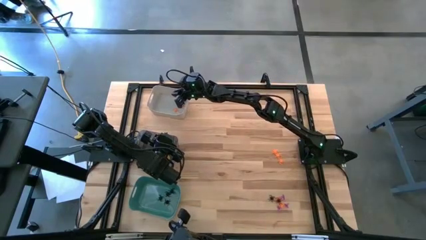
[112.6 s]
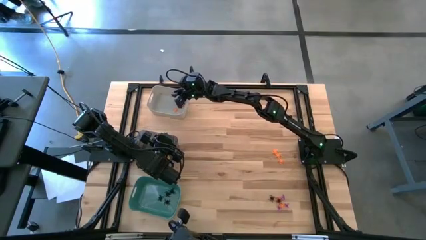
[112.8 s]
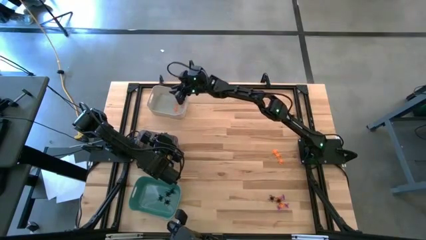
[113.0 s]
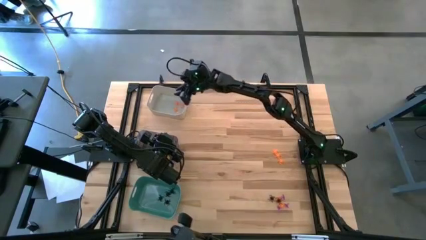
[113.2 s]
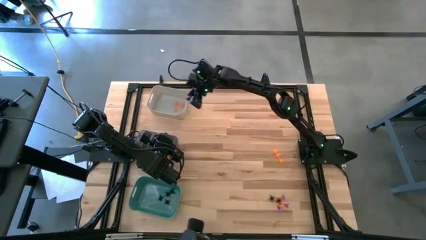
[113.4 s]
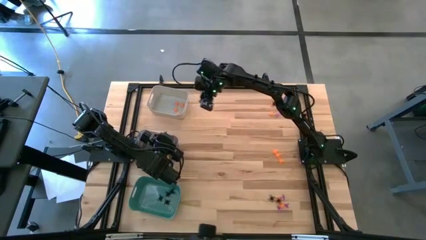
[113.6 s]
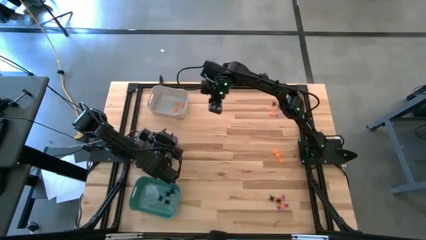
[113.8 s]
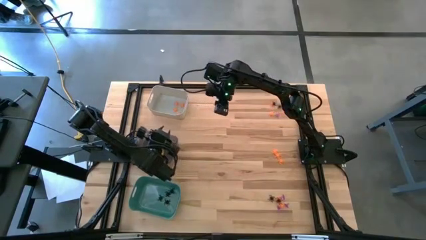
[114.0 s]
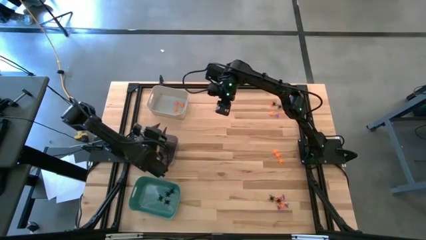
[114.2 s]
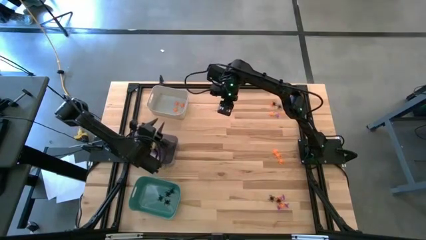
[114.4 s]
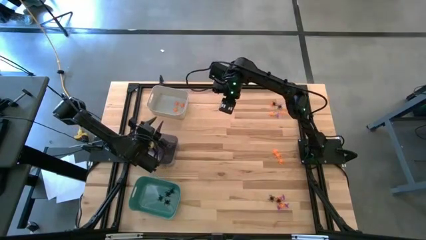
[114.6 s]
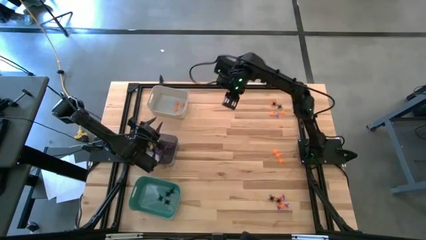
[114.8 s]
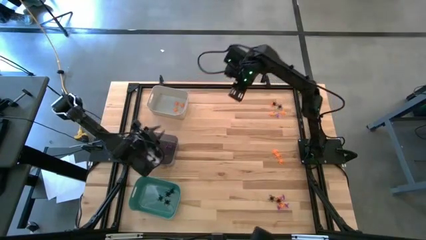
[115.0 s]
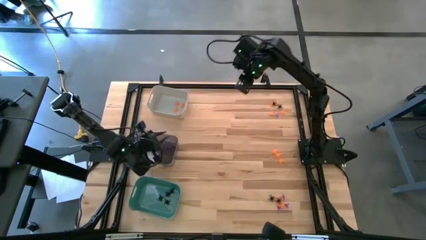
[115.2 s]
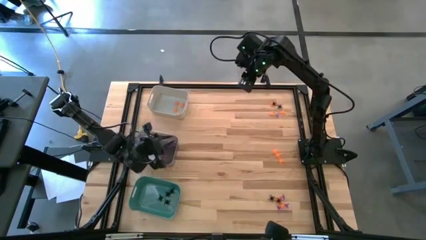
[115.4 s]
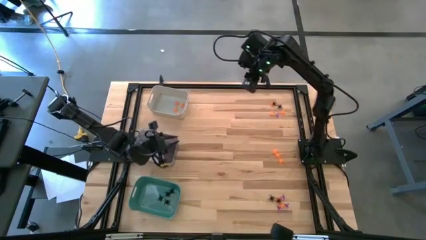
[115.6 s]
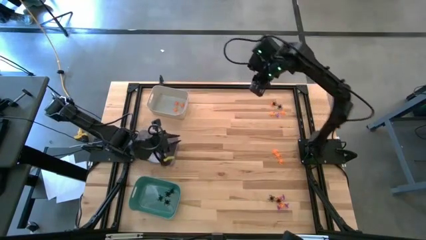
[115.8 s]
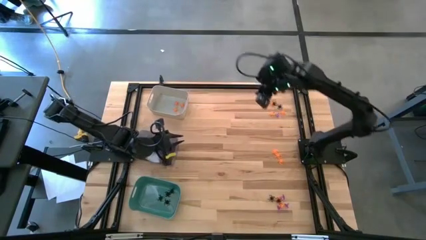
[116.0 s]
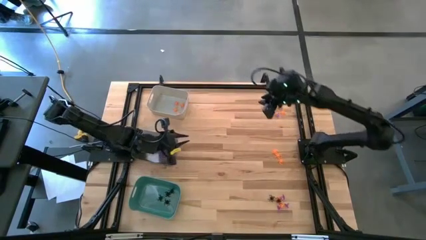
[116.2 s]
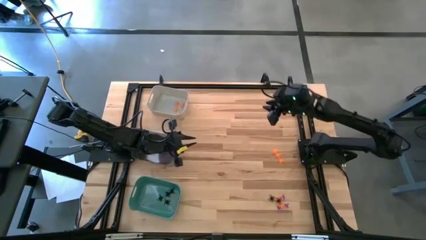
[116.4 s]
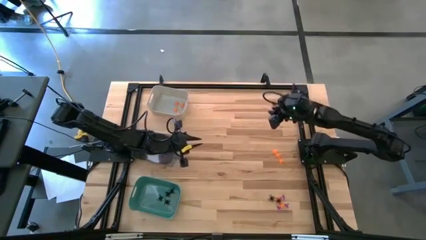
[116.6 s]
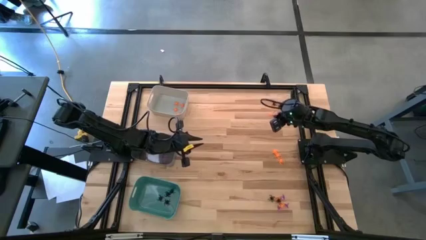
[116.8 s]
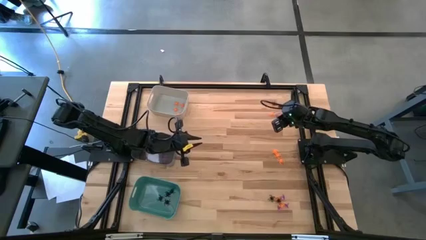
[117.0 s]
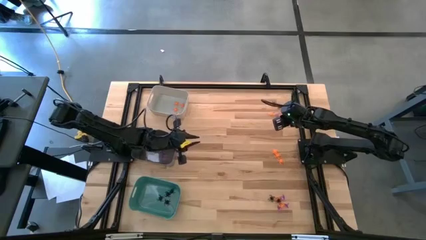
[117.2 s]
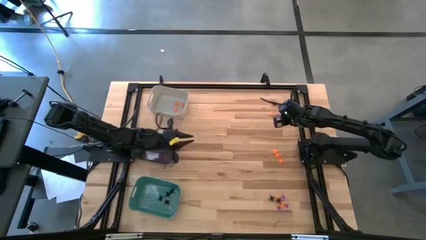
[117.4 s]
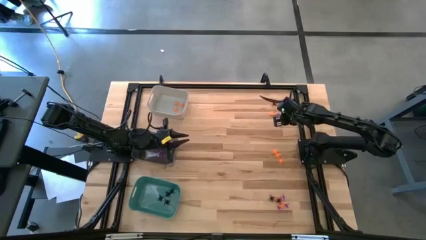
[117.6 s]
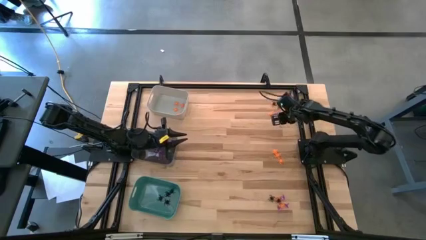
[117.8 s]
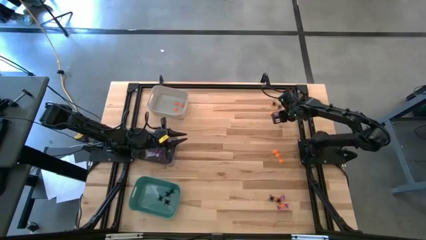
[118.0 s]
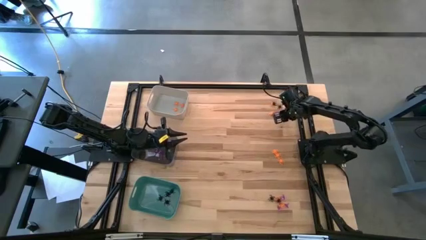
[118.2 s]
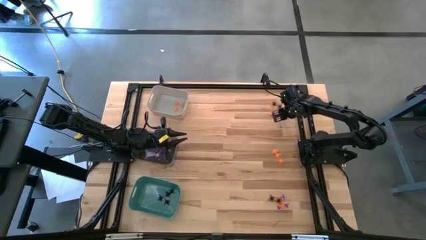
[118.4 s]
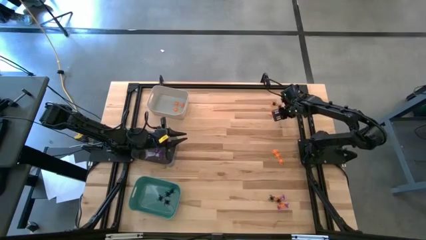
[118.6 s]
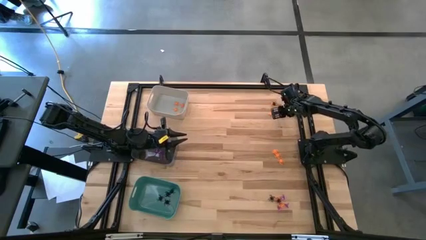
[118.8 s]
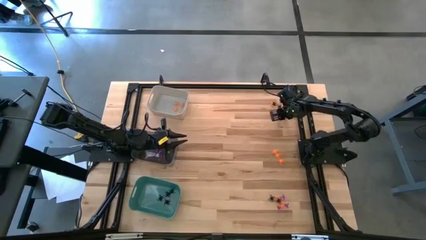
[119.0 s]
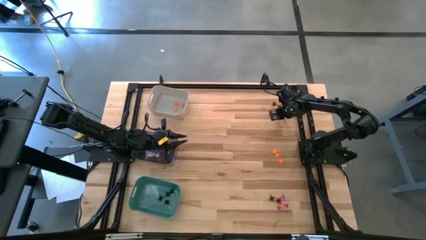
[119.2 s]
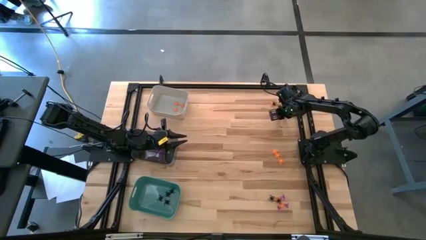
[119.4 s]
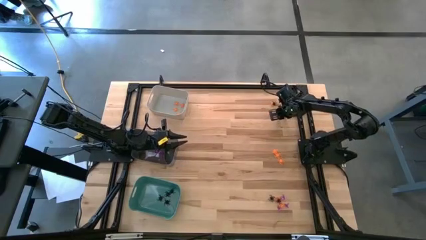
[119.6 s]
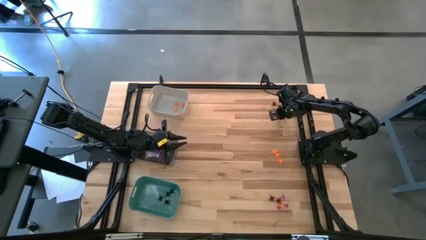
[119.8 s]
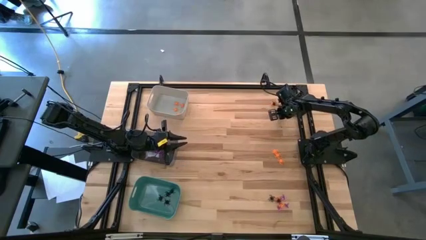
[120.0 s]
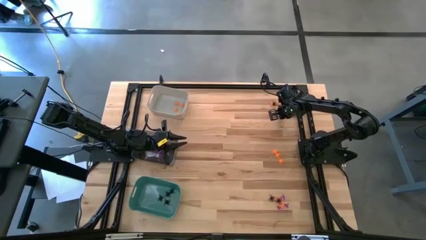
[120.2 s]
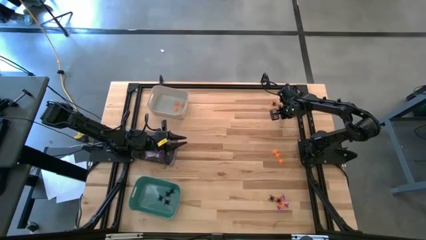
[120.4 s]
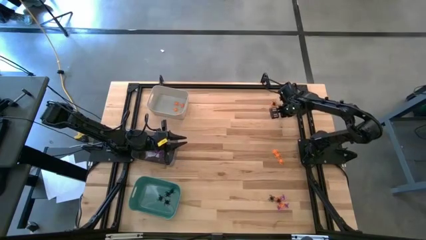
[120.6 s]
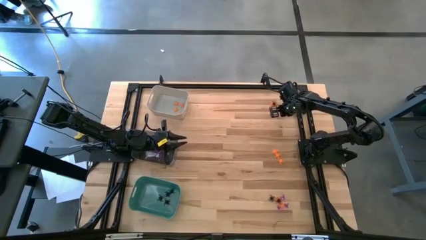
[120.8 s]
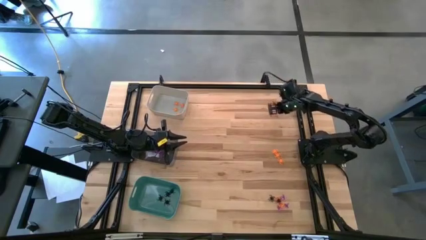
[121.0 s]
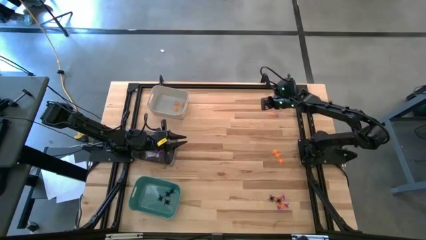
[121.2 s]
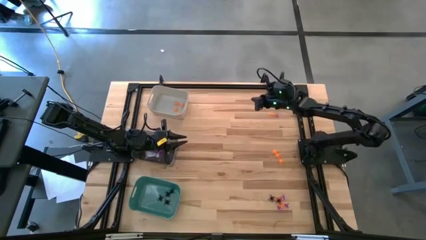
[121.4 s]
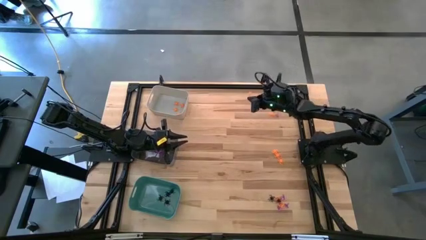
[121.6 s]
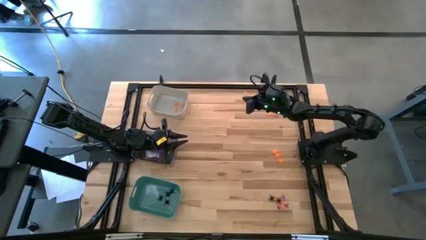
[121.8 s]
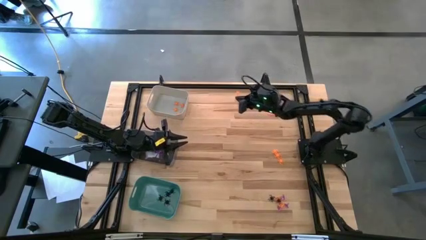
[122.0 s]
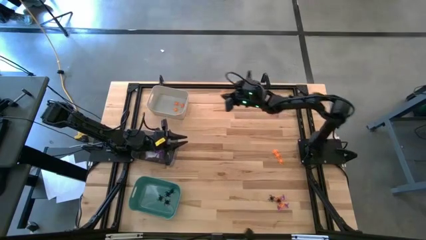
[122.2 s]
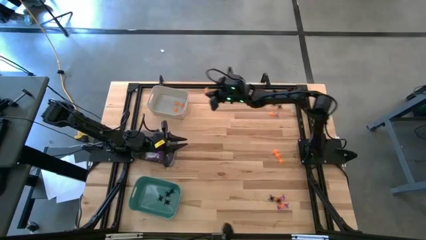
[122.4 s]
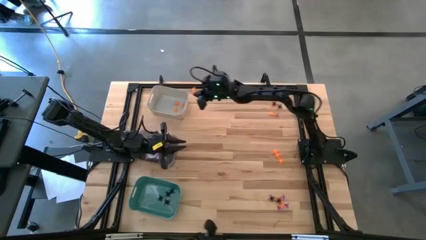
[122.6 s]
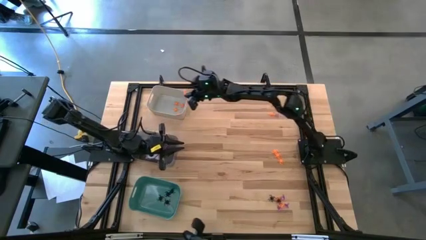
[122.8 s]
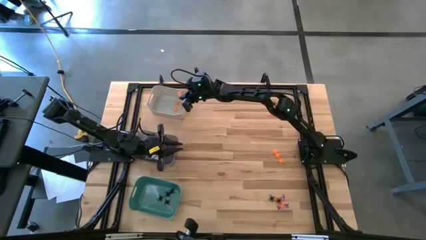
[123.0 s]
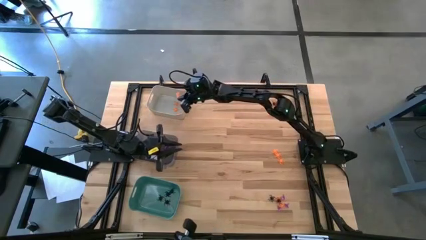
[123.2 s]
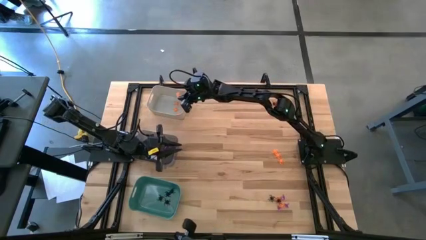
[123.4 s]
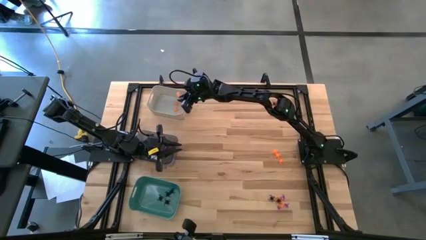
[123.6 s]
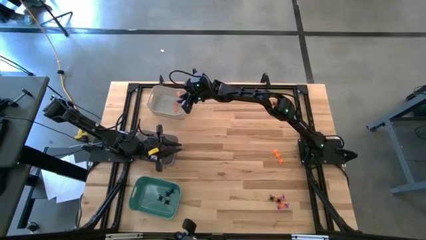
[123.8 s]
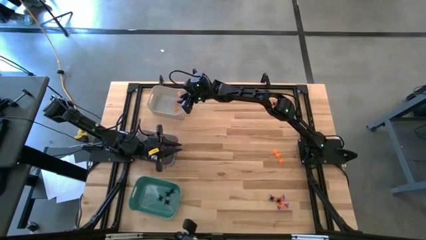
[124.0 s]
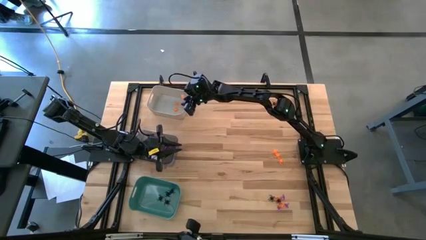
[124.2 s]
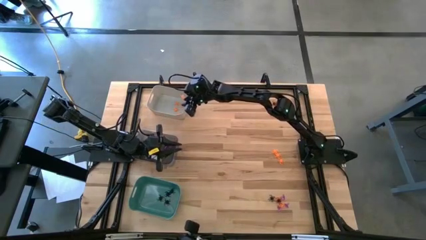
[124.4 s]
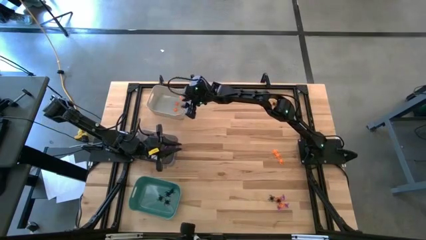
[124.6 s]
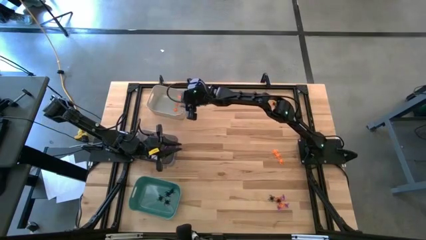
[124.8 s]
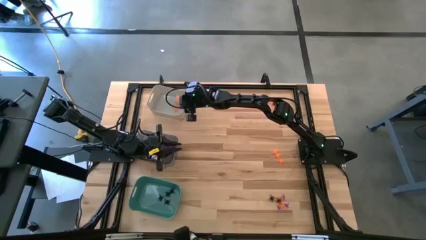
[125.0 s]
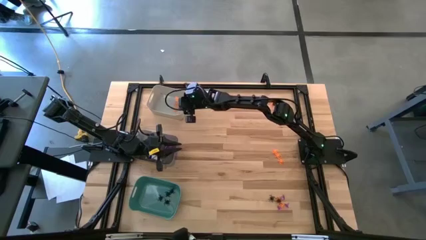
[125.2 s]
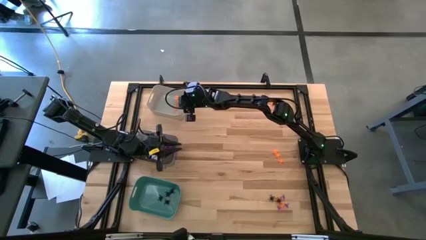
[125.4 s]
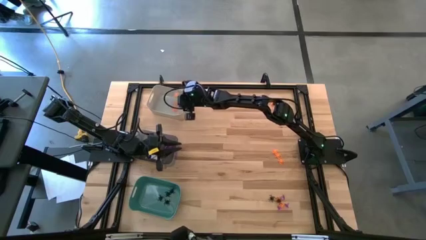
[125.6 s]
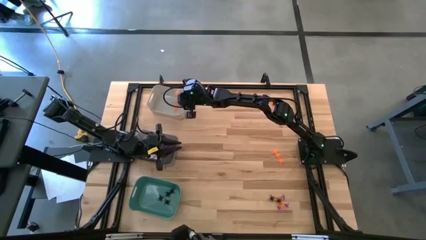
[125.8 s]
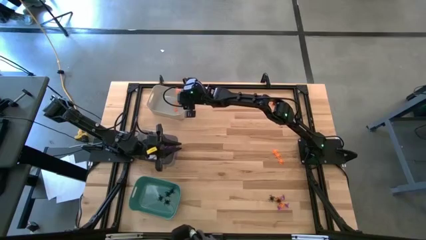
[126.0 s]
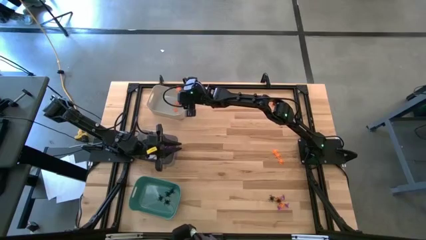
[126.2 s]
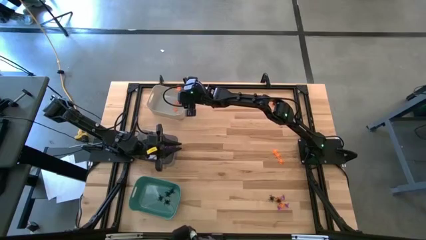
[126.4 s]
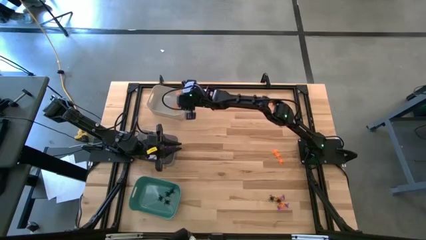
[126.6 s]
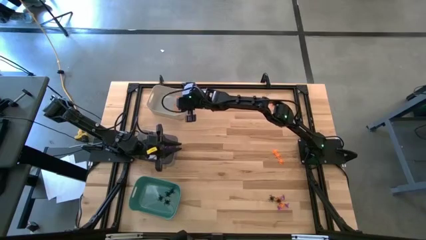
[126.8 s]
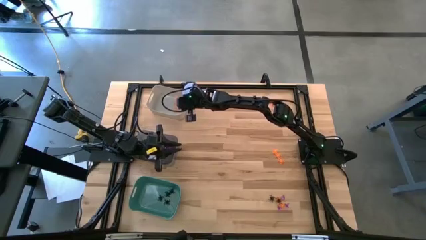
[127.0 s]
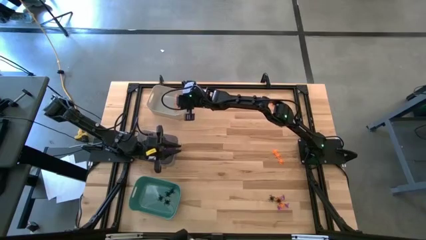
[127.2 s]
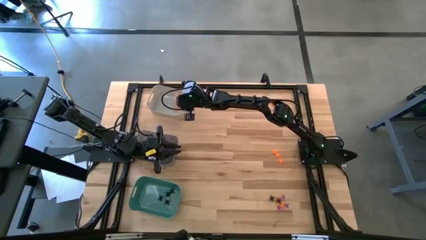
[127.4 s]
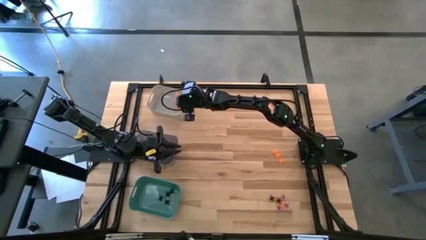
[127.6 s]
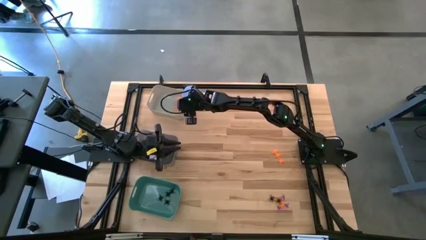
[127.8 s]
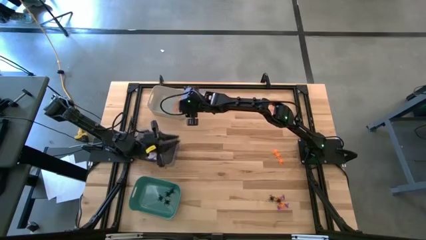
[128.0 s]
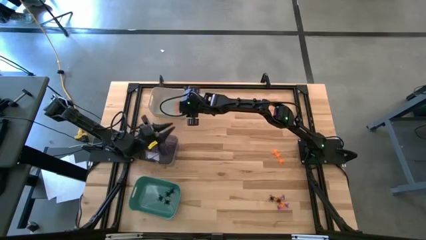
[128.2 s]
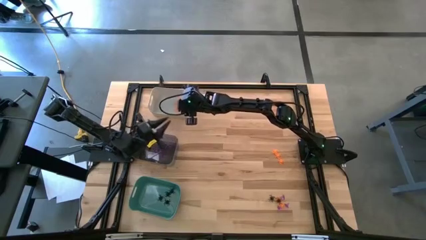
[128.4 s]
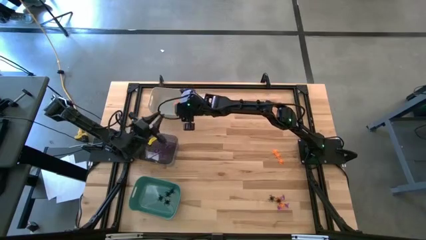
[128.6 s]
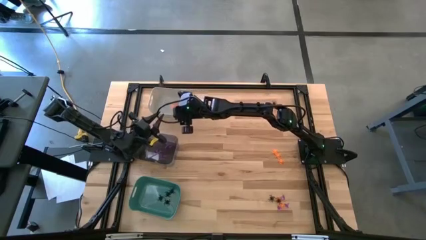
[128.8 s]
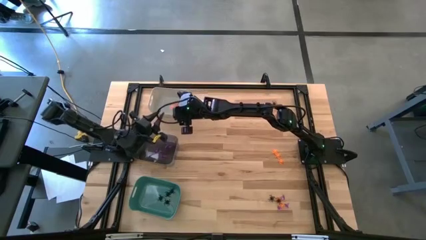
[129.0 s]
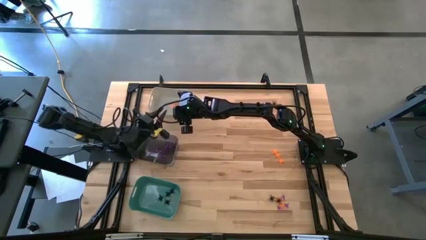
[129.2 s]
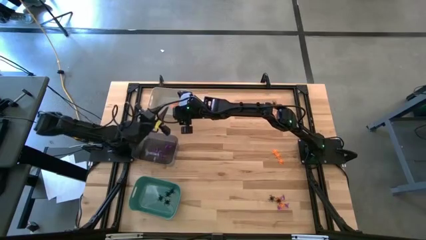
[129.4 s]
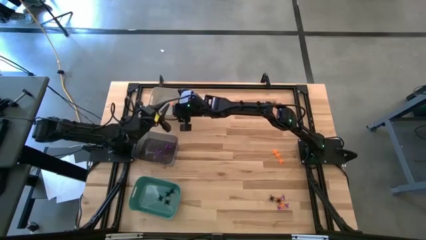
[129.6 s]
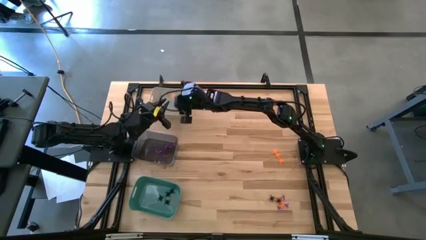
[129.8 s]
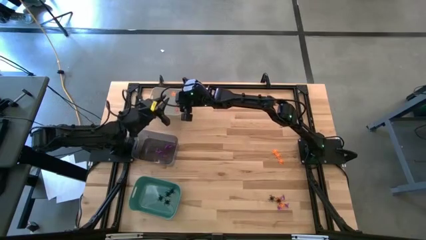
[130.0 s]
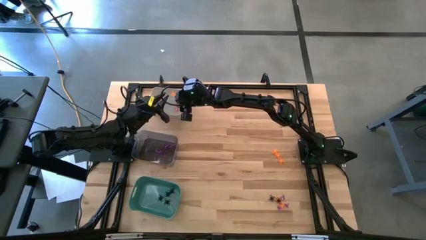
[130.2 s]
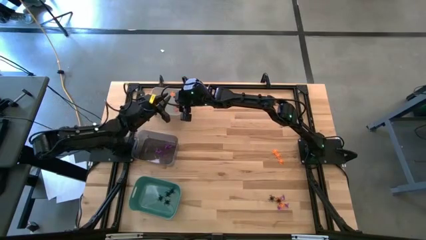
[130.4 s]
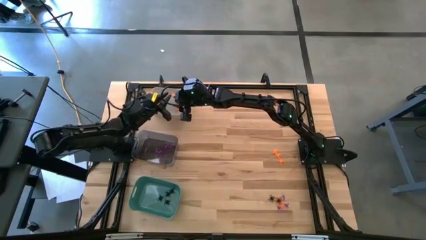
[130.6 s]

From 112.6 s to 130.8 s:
Task: Sort Halloween decoration
Put the top right orange spider into the gray bin
